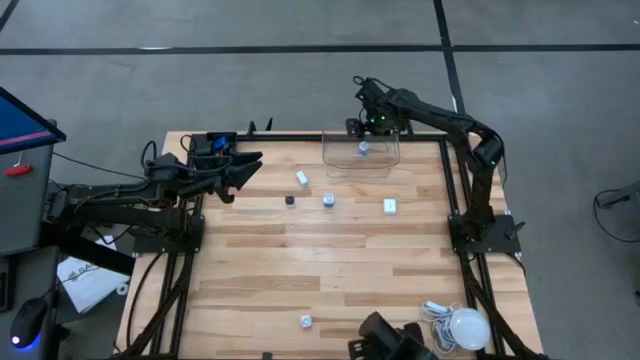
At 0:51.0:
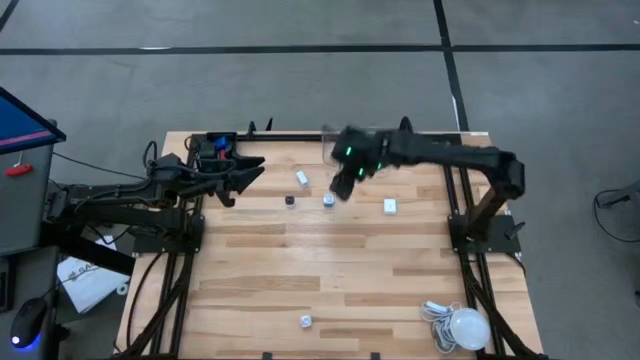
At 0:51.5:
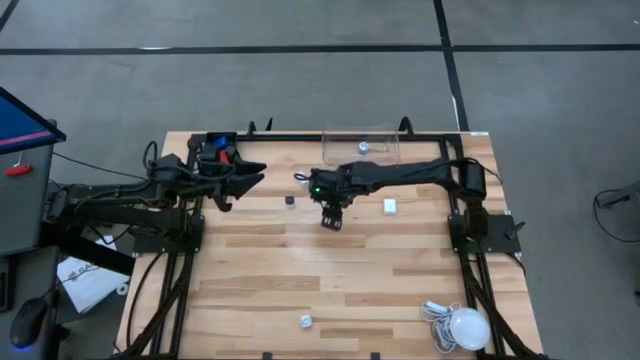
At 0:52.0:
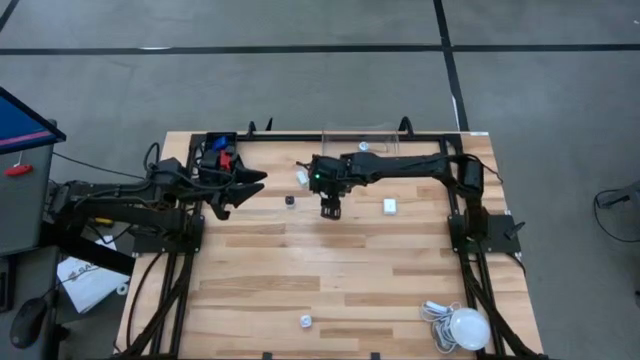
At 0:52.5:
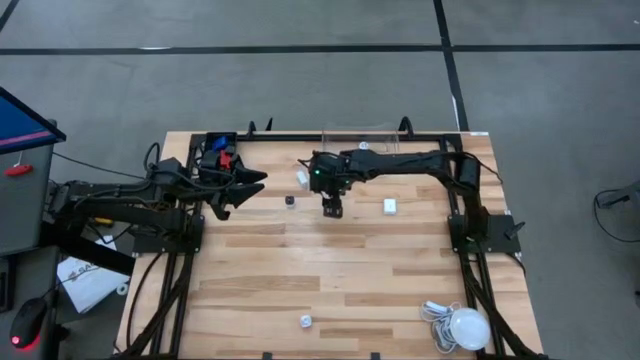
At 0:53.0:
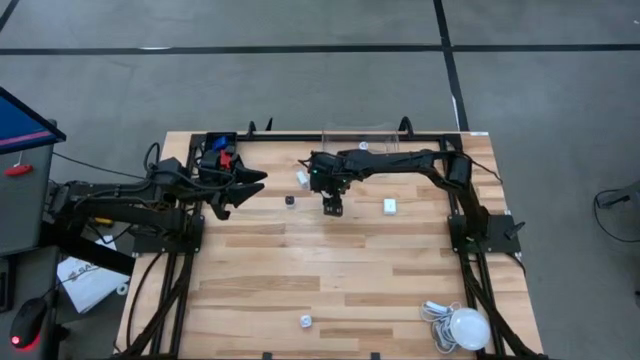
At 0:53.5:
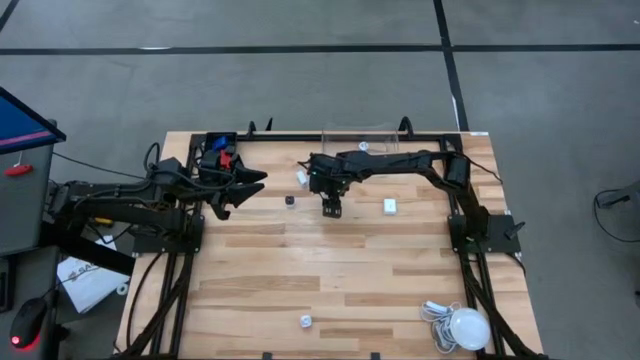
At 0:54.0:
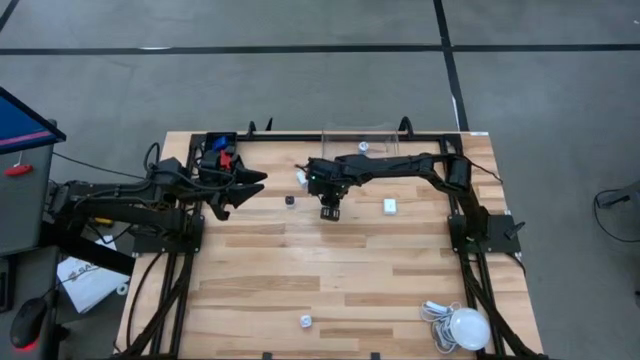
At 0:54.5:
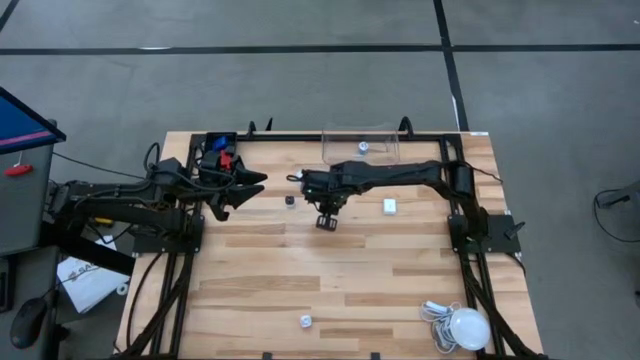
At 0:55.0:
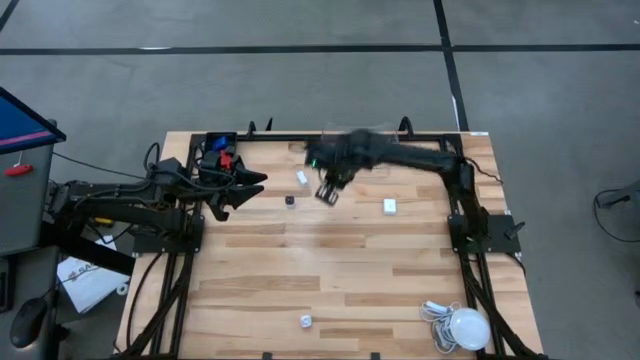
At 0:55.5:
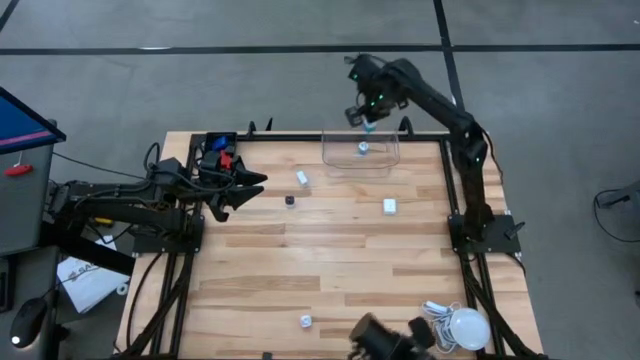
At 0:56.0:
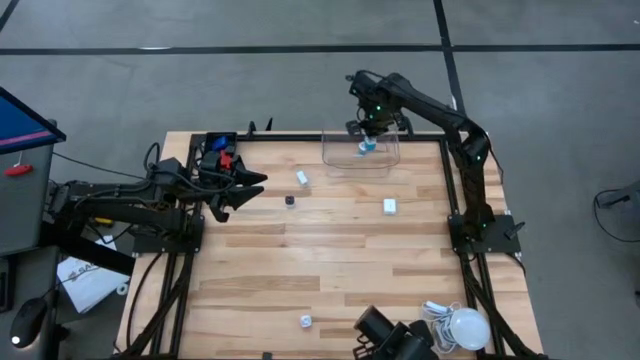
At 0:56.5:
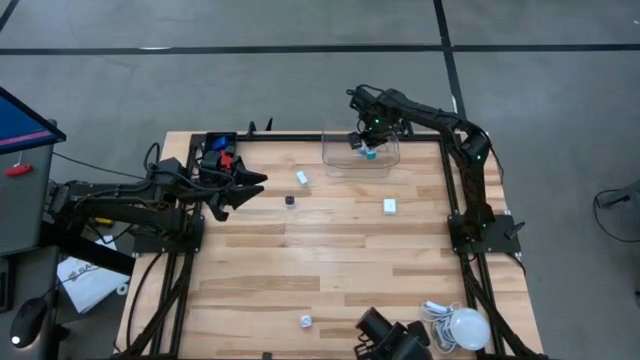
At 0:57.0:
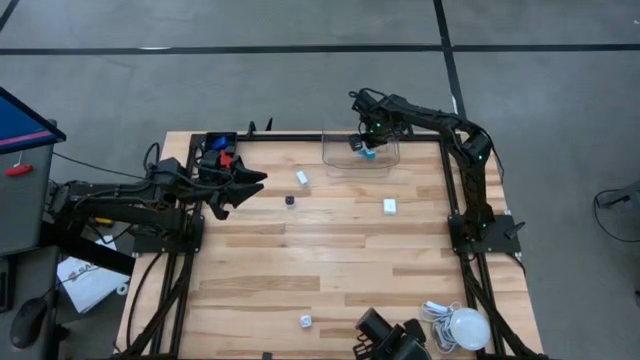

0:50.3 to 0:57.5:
Task: Pick & Place Office items
Put the blue charger adapter into the transparent bin

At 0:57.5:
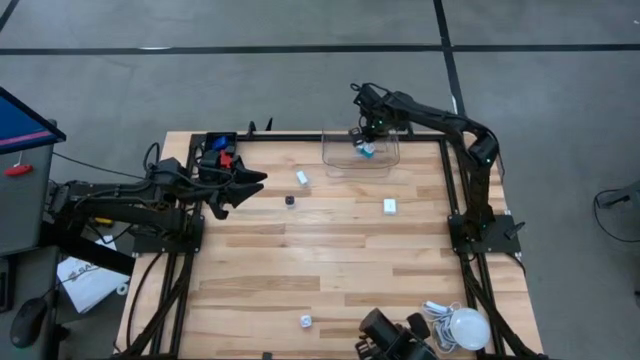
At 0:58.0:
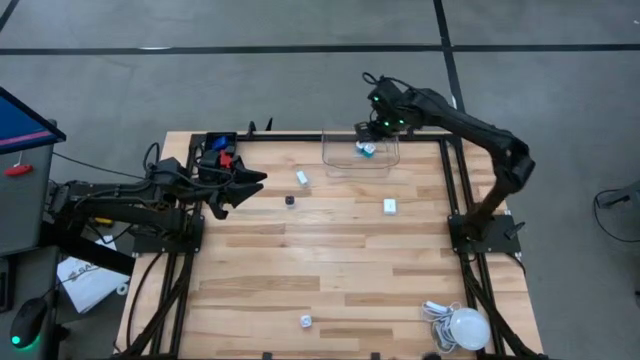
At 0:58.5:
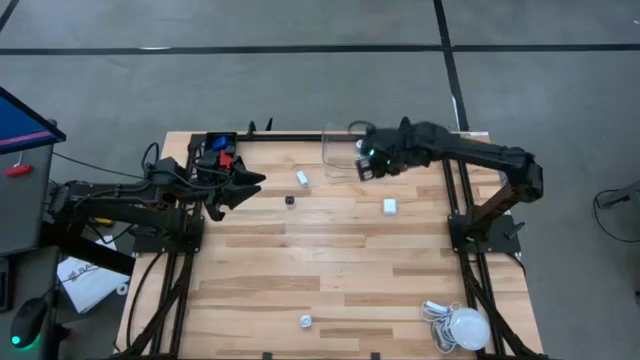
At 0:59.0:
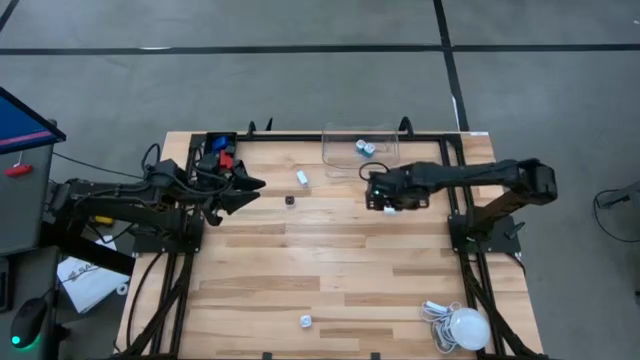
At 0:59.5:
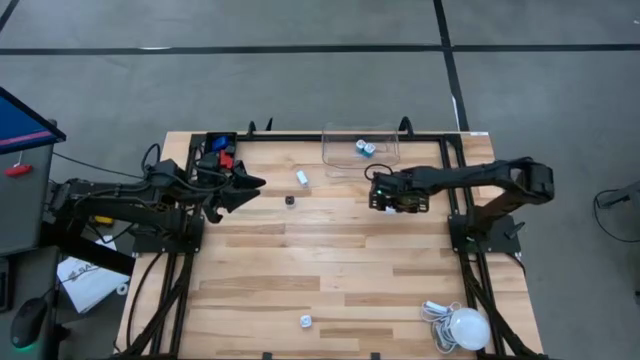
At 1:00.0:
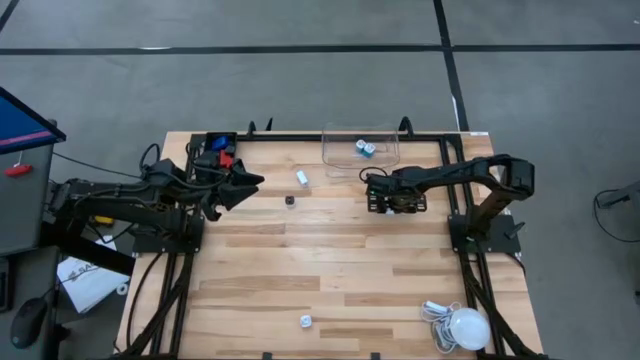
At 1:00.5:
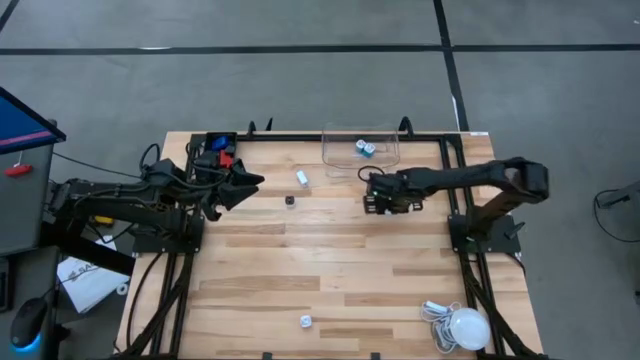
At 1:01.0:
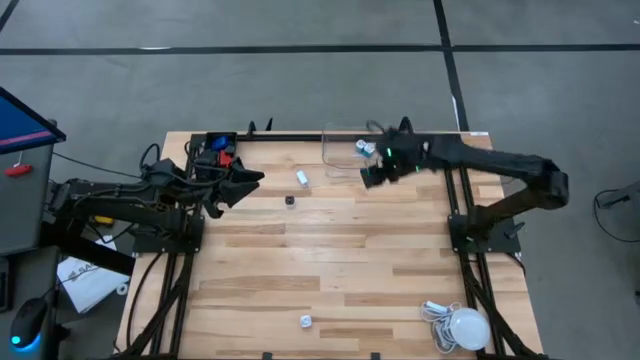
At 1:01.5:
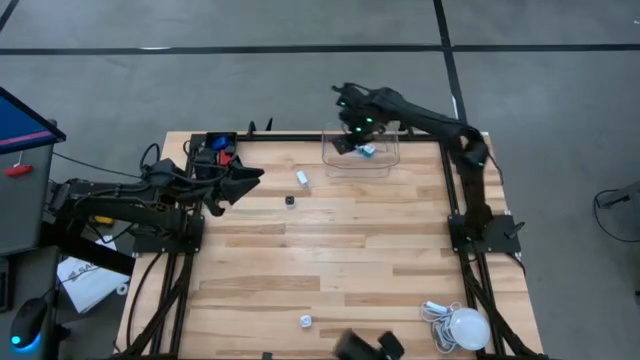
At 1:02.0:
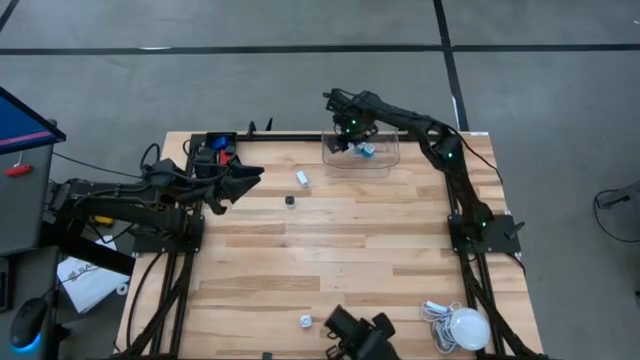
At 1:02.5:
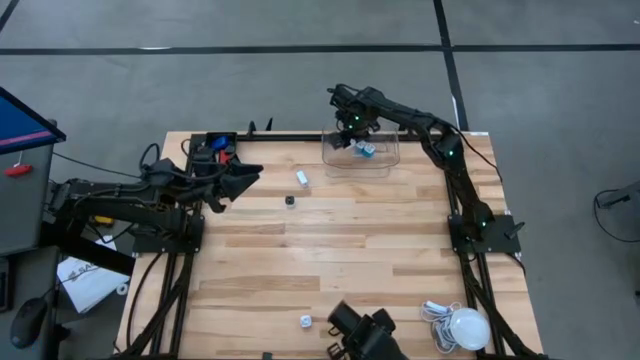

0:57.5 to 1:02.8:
Put the right white charger adapter into the transparent bin

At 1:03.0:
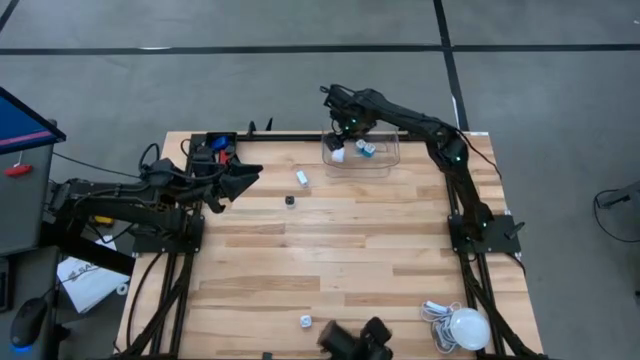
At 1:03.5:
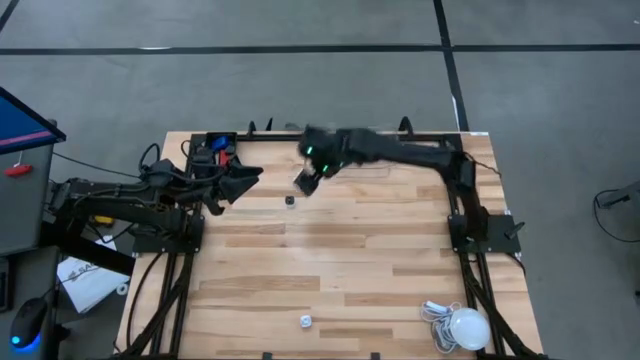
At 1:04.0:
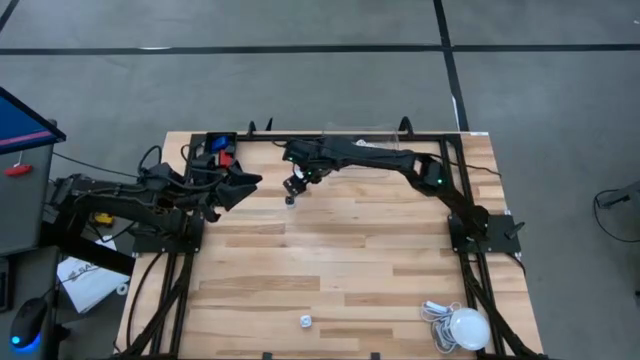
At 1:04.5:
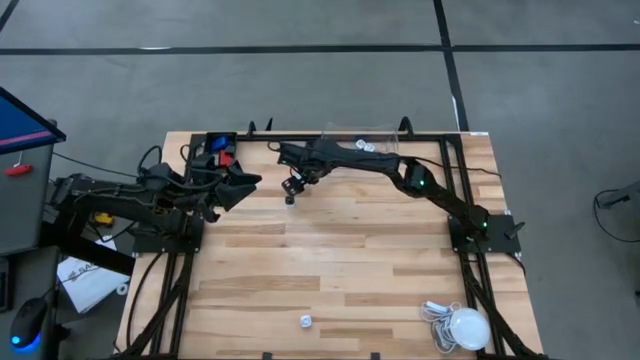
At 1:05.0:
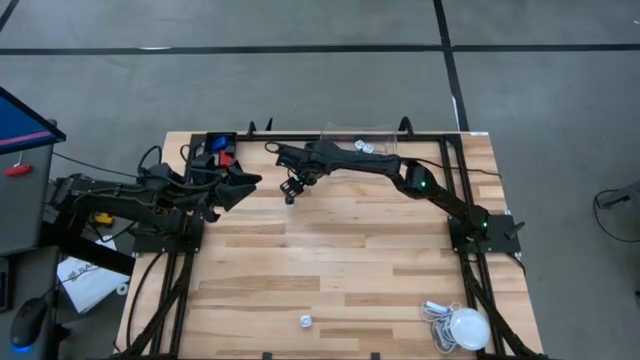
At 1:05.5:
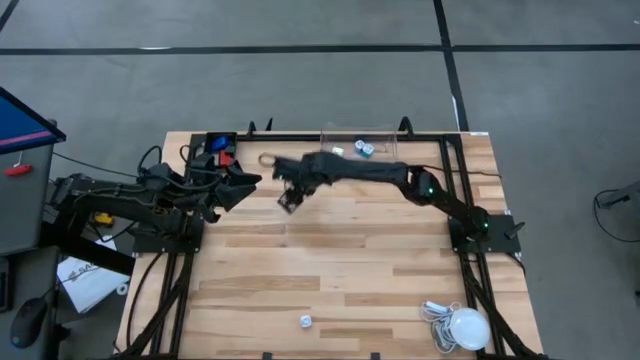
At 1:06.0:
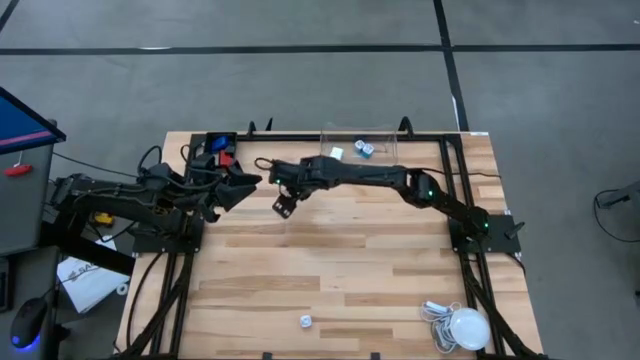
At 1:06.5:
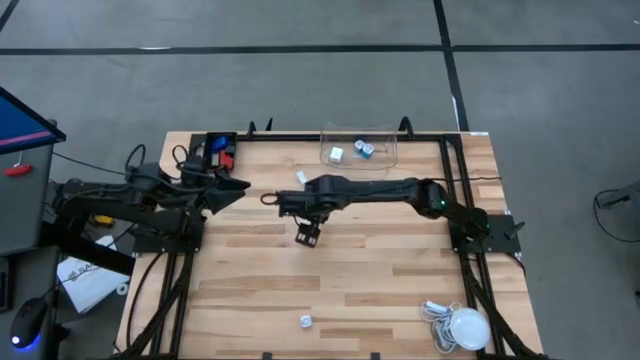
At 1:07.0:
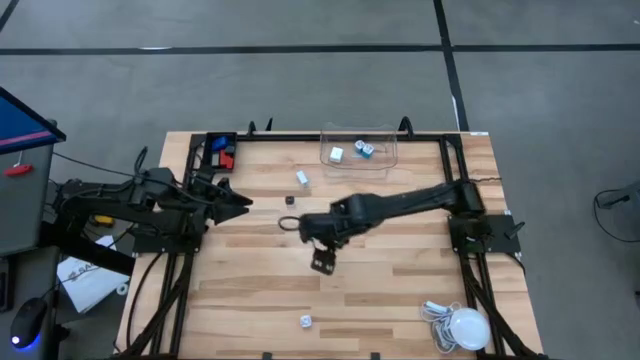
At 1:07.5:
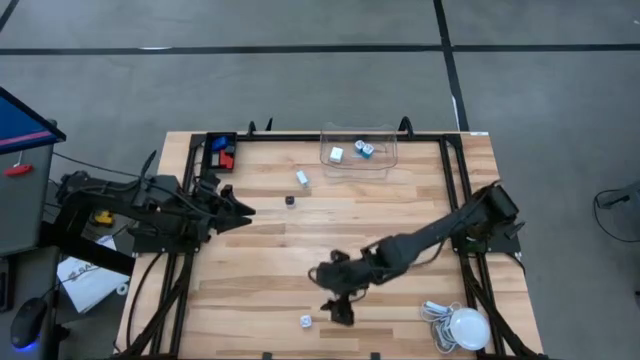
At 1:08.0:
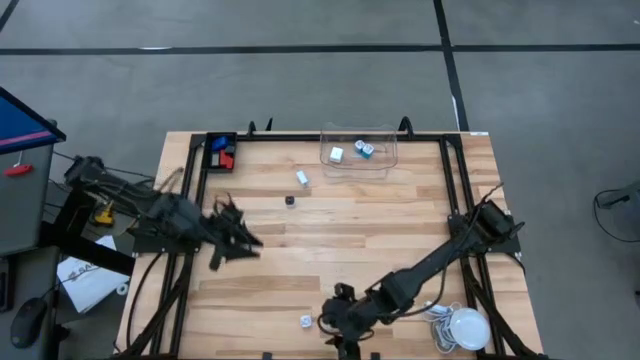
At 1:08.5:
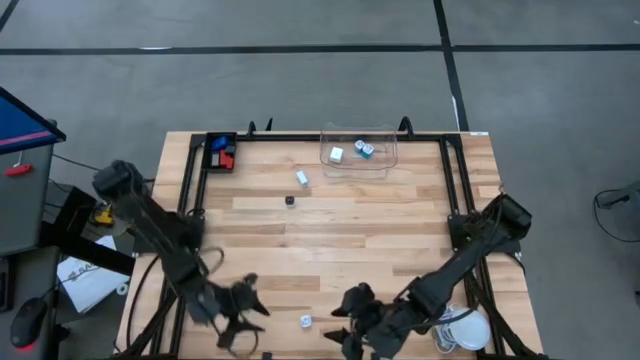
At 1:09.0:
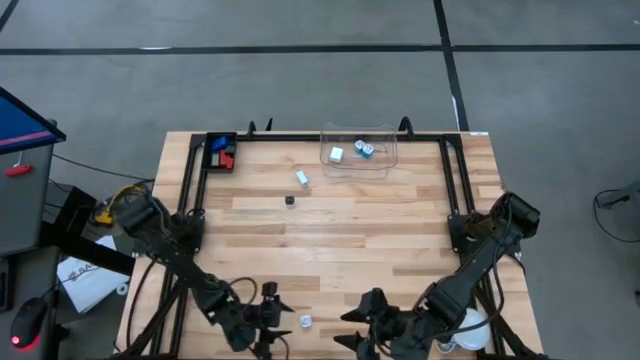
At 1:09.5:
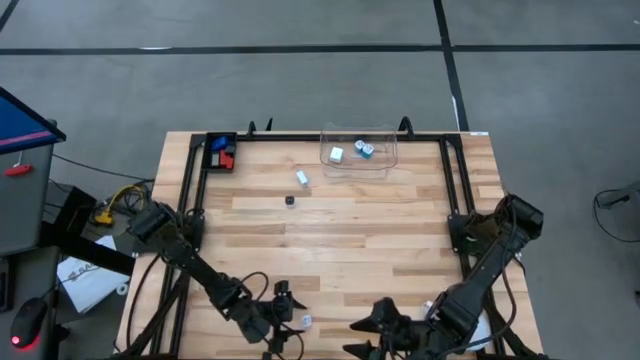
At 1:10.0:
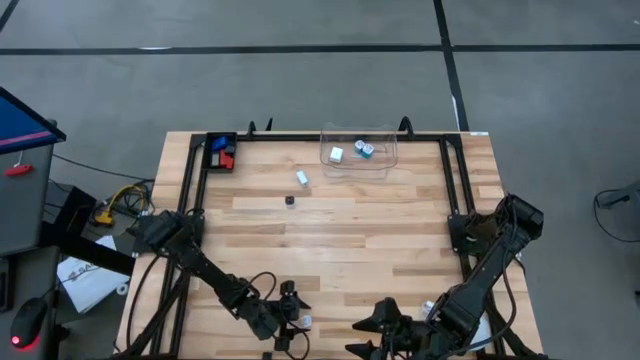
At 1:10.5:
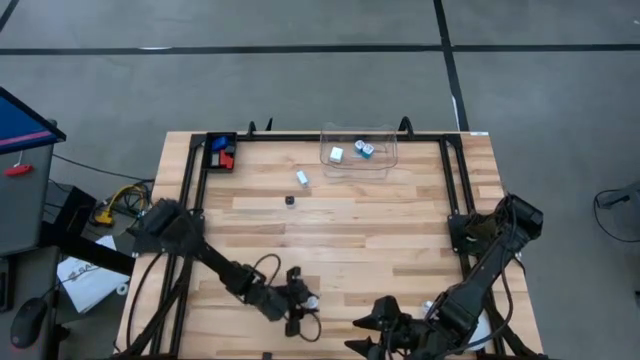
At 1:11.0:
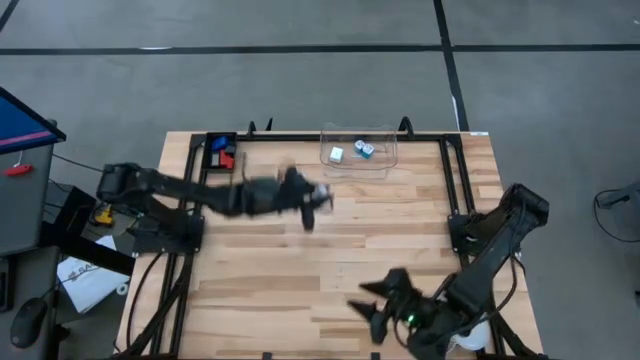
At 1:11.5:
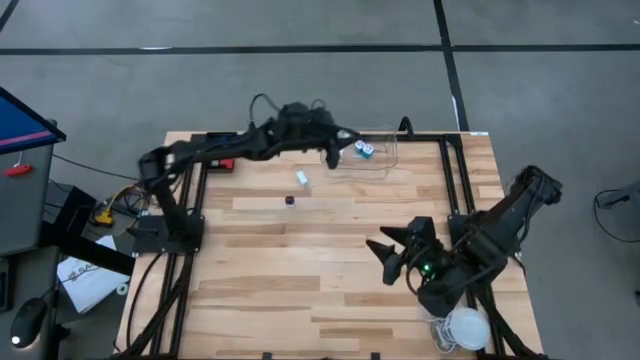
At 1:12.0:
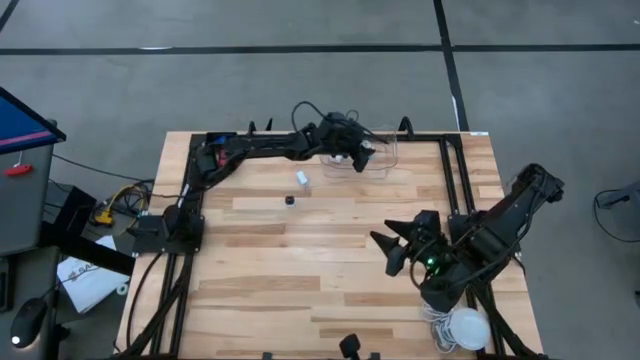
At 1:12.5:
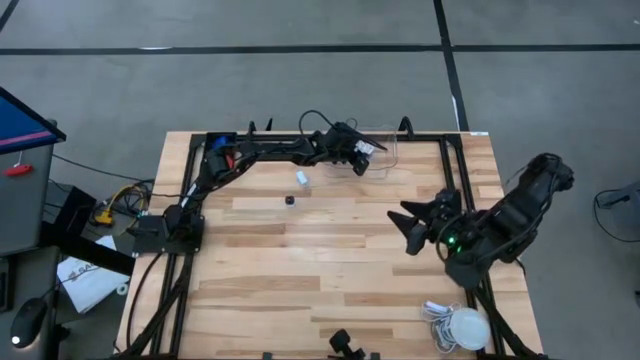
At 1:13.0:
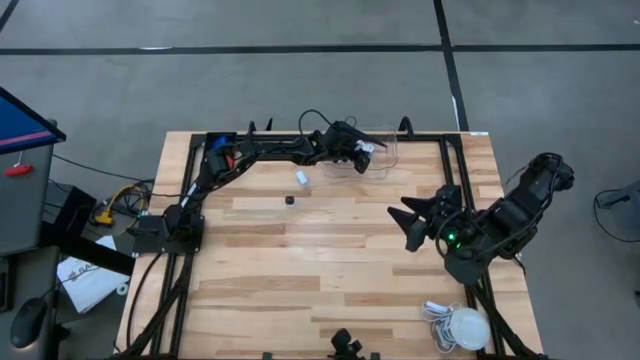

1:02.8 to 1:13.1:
Put the pink charger adapter into the transparent bin
